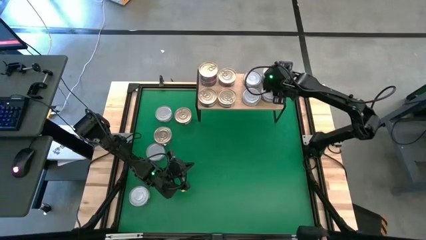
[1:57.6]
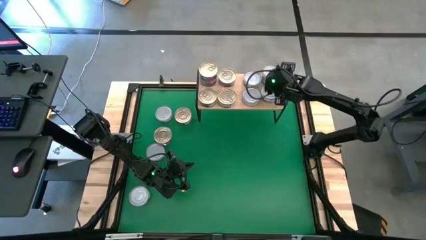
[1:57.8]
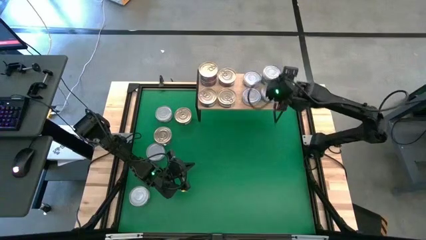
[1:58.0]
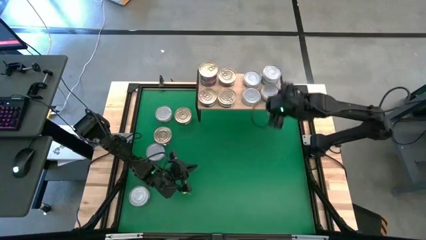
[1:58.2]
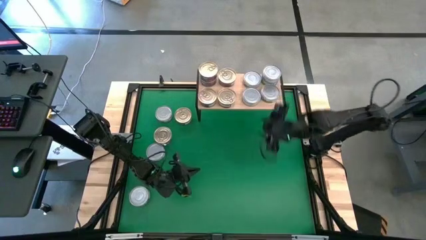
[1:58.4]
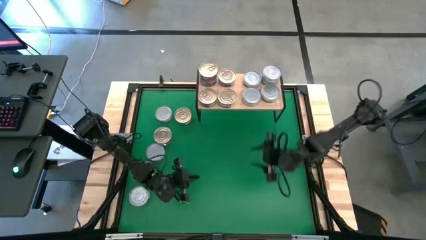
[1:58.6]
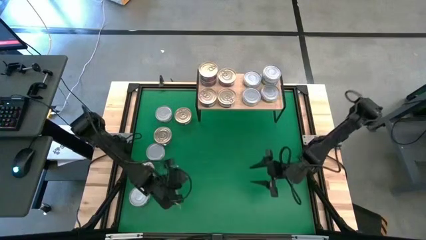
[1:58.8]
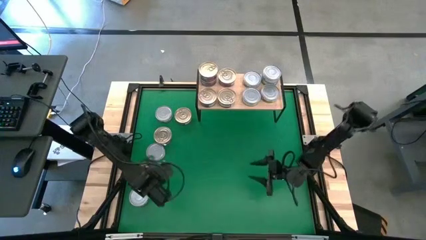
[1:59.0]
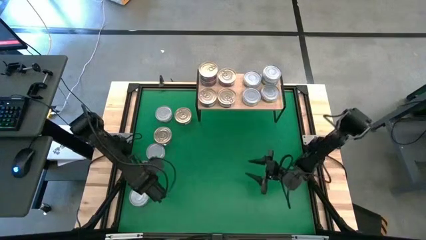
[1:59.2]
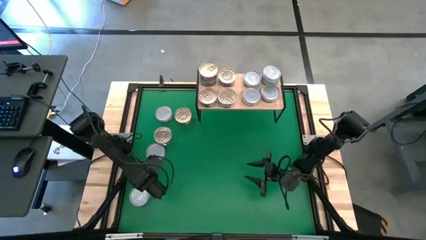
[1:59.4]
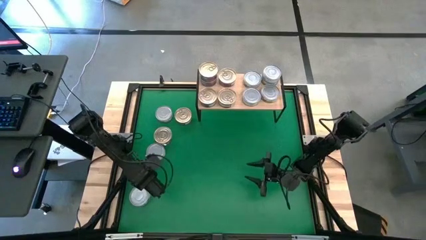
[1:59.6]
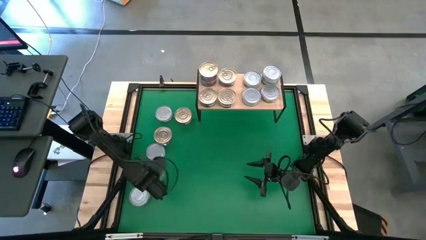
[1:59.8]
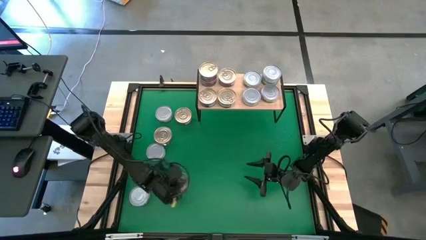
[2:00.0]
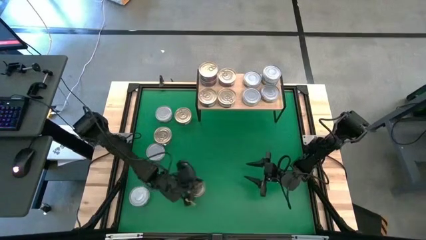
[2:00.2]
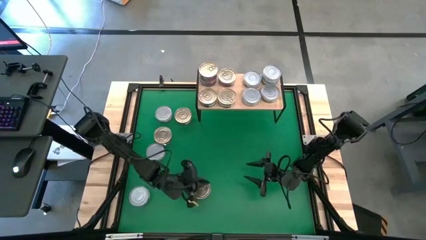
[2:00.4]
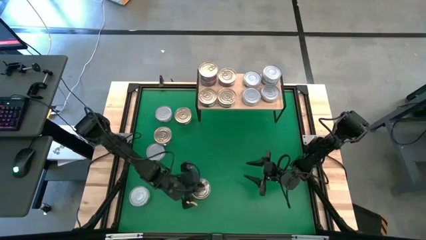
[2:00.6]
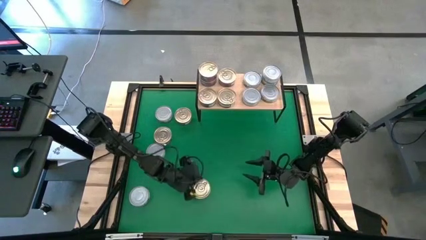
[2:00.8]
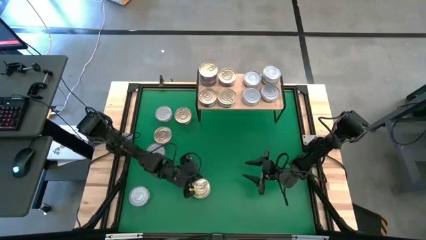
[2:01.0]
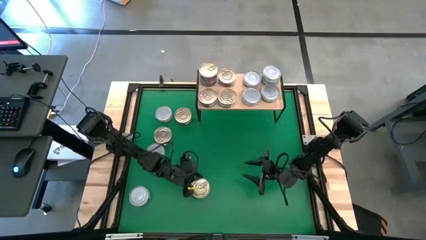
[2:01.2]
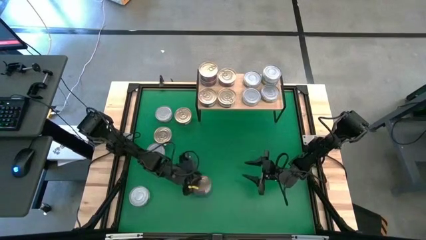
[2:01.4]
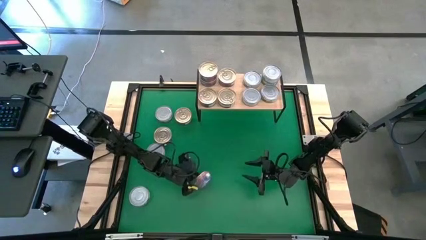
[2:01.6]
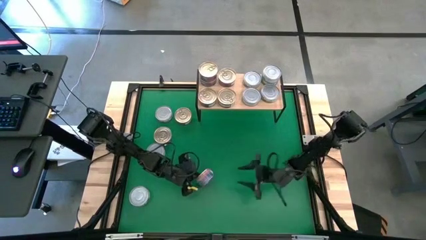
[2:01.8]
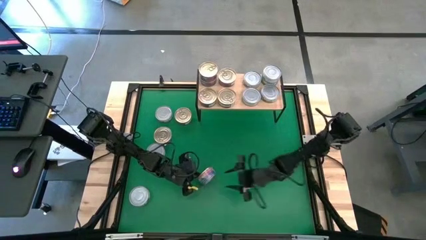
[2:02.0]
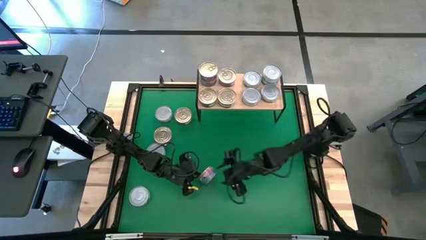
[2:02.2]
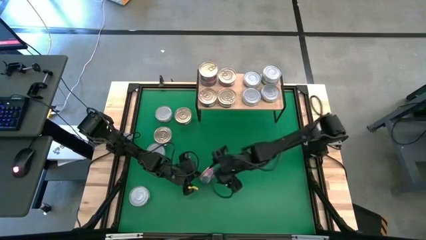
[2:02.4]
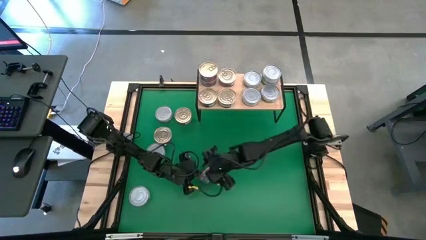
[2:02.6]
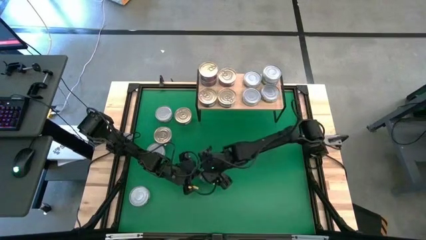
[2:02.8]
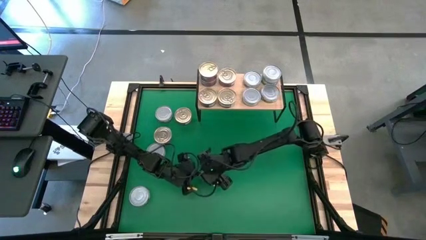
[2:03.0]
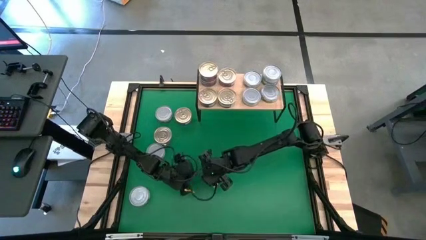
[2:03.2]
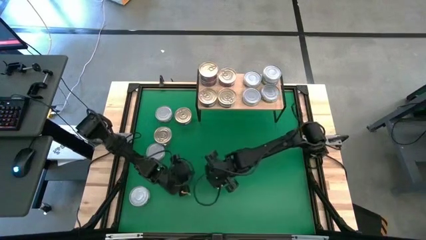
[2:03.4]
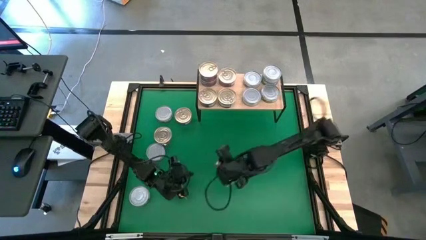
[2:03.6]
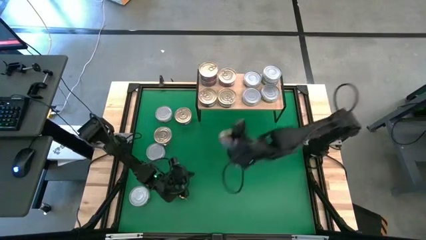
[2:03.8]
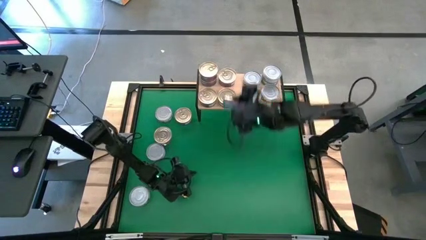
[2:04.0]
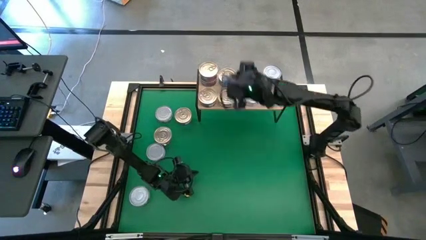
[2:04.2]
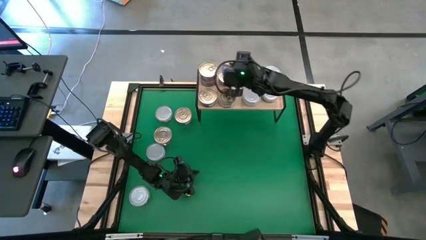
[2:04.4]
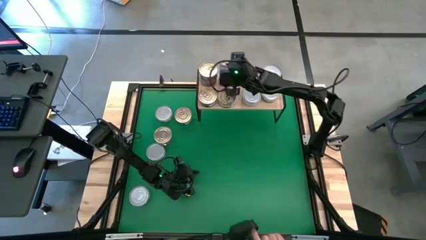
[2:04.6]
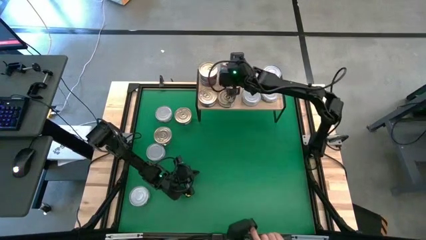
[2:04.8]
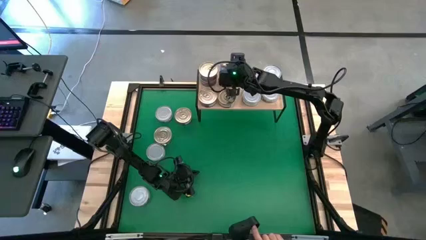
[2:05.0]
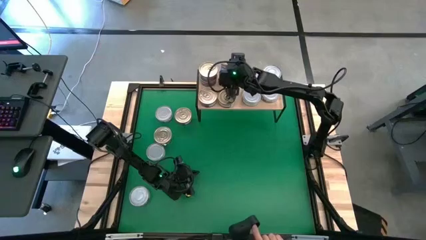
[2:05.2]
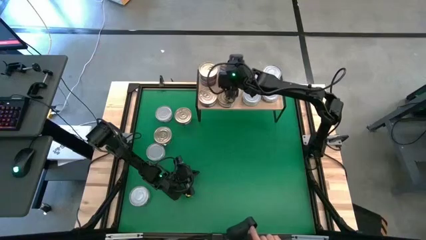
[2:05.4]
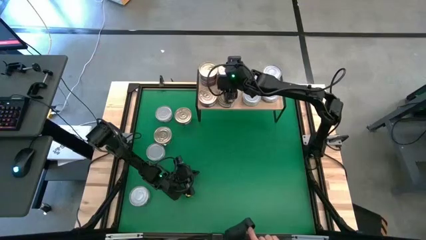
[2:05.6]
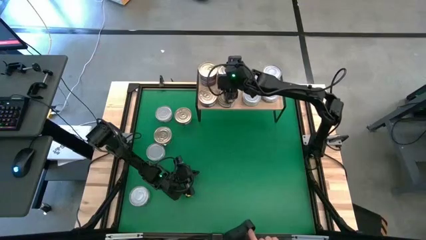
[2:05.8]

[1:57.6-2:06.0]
Task: Stack canned seafood by type on shelf
Stack the blue pink tuna can on top of the top right blue pink tuna can on the shelf

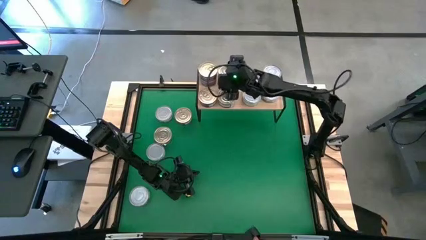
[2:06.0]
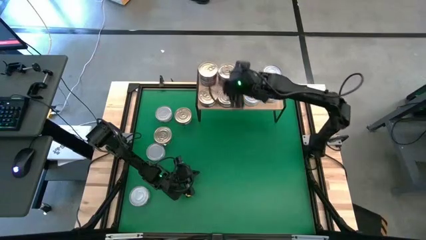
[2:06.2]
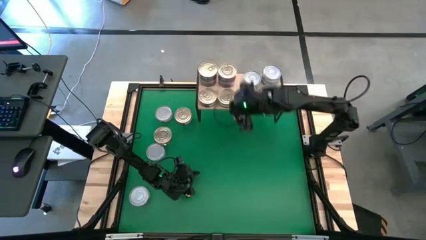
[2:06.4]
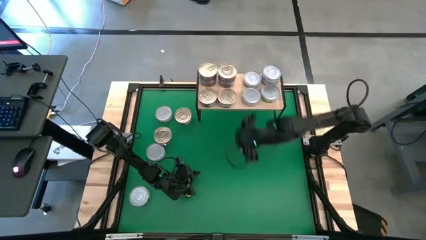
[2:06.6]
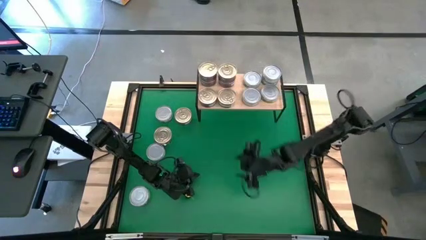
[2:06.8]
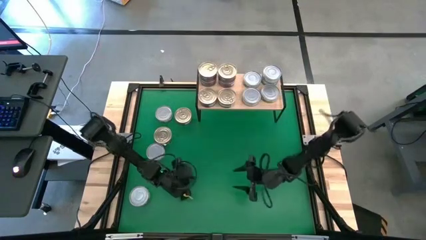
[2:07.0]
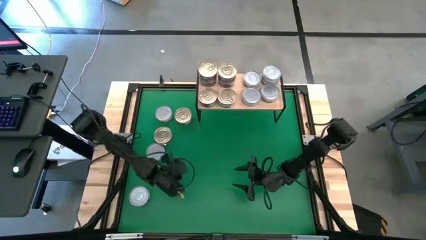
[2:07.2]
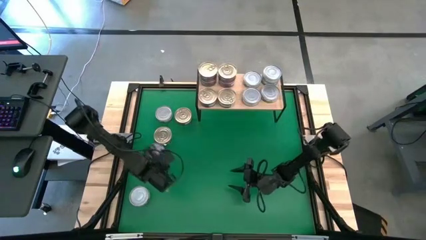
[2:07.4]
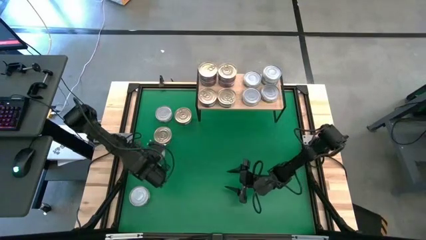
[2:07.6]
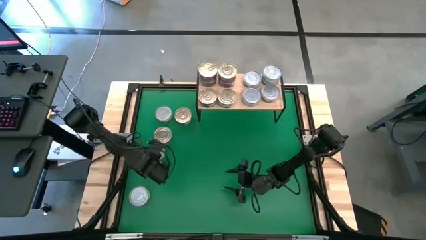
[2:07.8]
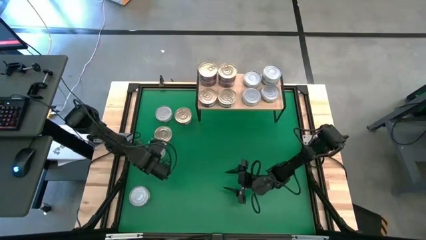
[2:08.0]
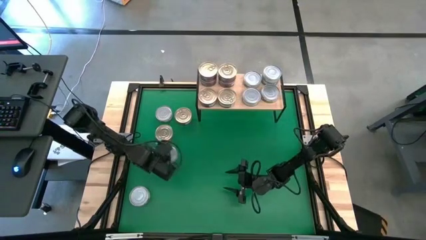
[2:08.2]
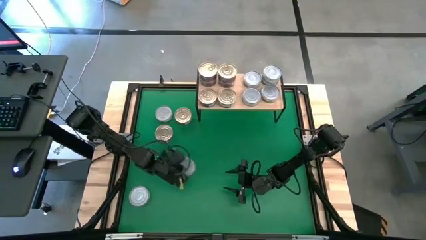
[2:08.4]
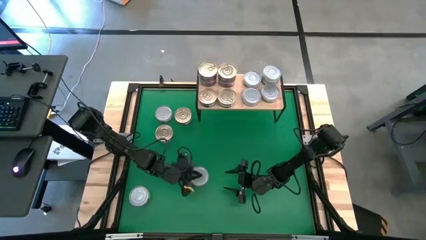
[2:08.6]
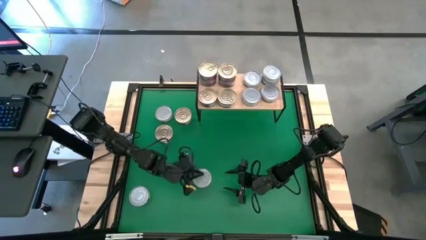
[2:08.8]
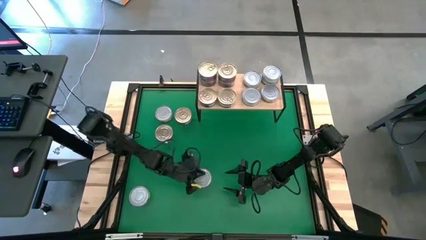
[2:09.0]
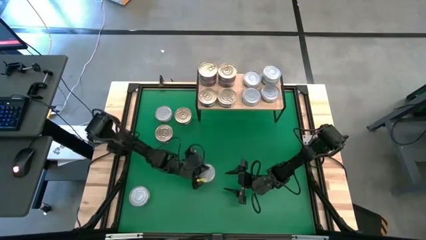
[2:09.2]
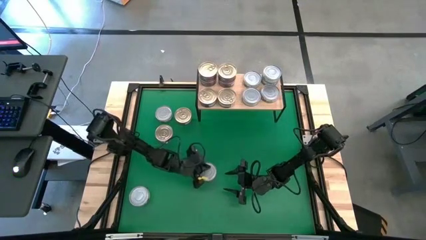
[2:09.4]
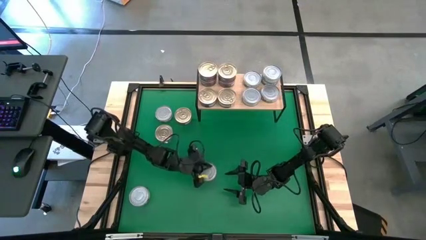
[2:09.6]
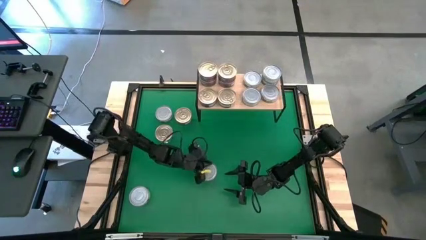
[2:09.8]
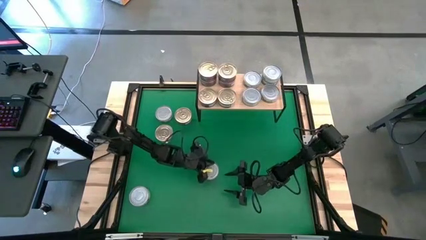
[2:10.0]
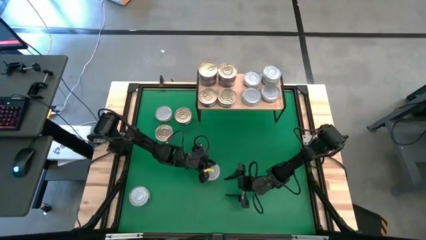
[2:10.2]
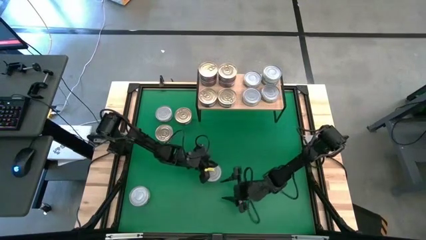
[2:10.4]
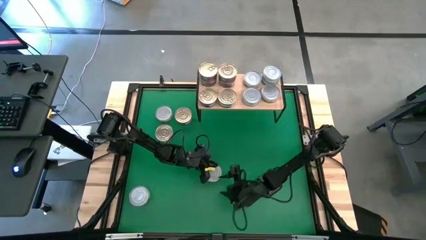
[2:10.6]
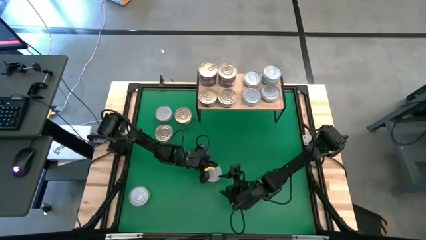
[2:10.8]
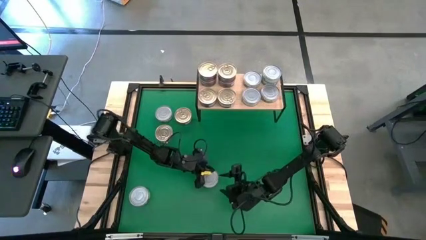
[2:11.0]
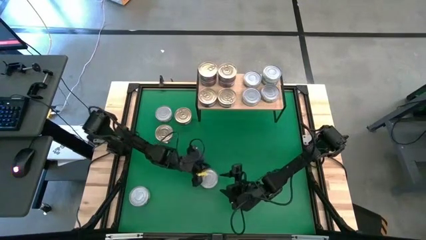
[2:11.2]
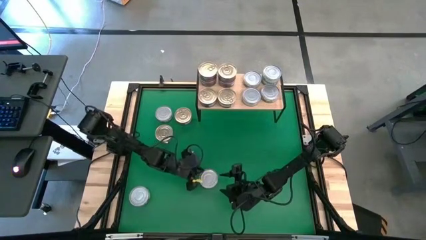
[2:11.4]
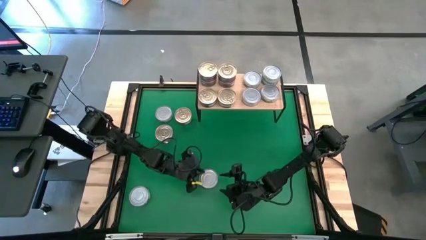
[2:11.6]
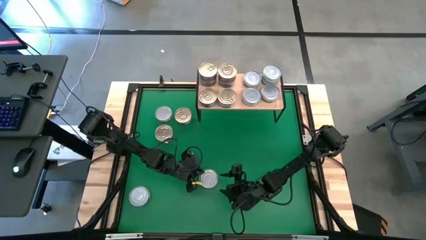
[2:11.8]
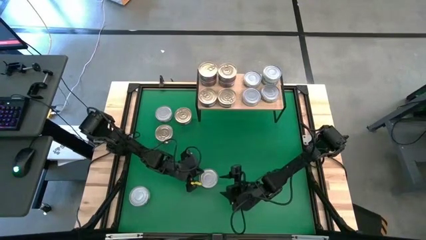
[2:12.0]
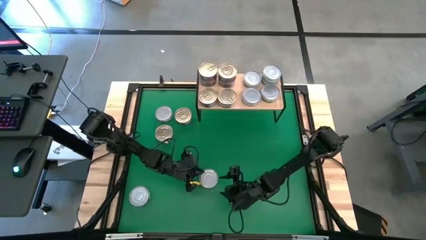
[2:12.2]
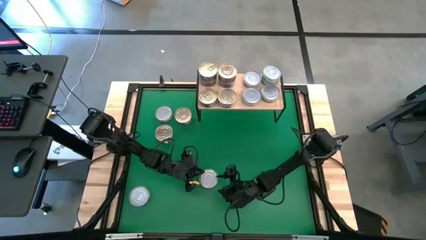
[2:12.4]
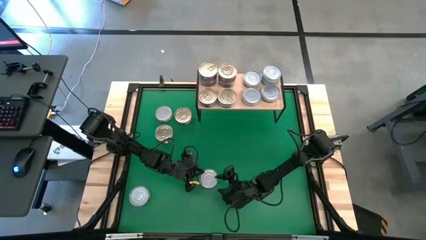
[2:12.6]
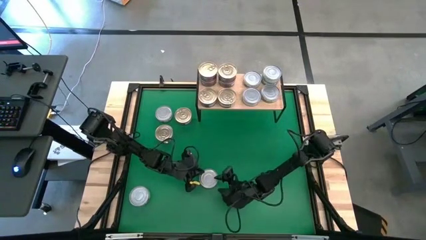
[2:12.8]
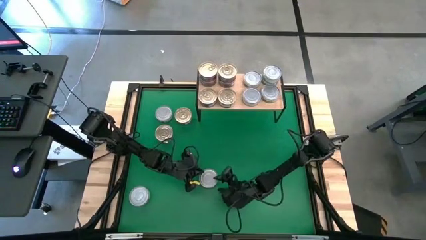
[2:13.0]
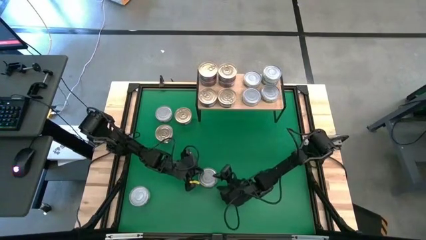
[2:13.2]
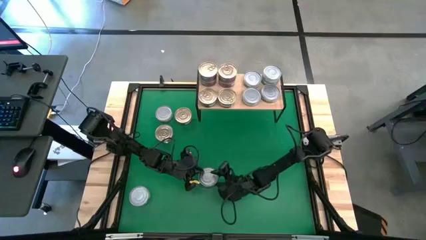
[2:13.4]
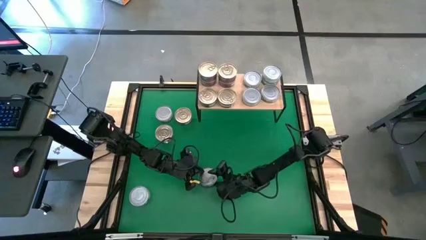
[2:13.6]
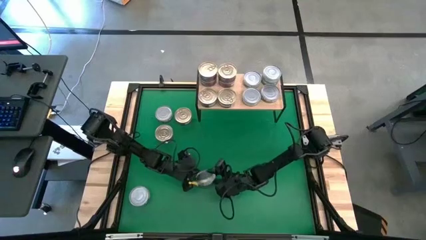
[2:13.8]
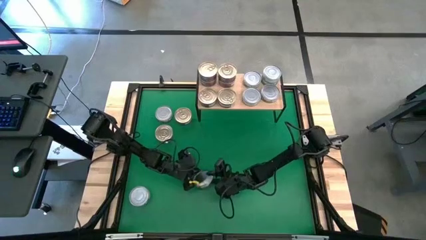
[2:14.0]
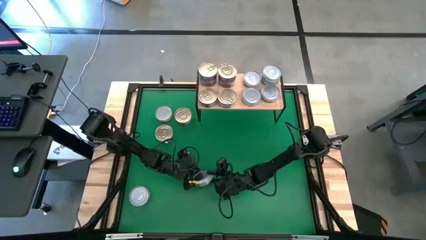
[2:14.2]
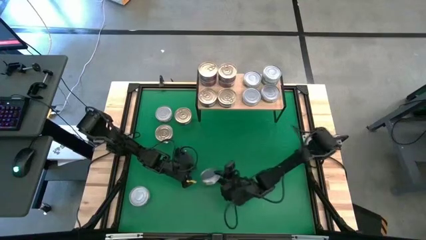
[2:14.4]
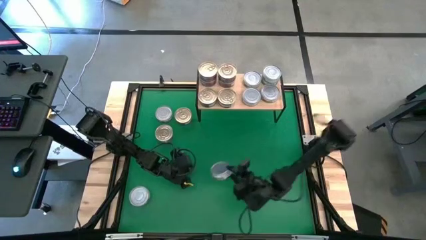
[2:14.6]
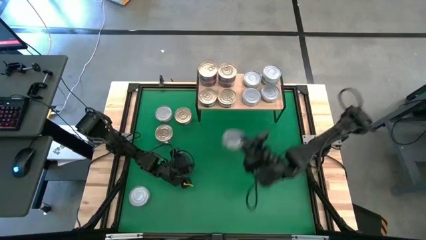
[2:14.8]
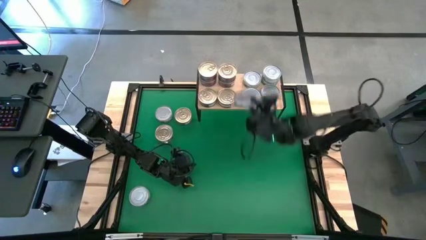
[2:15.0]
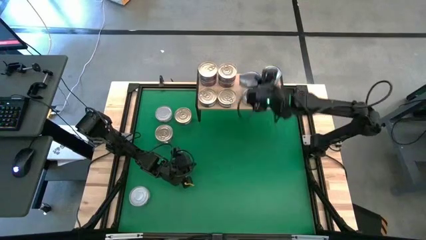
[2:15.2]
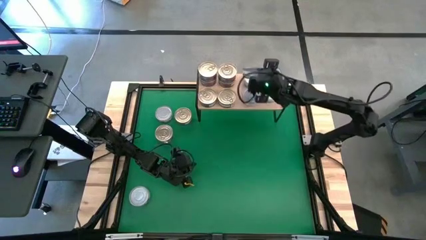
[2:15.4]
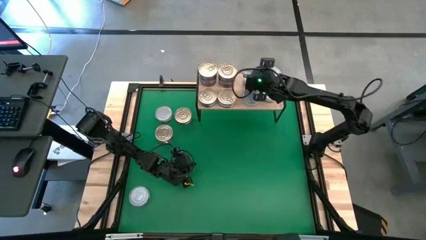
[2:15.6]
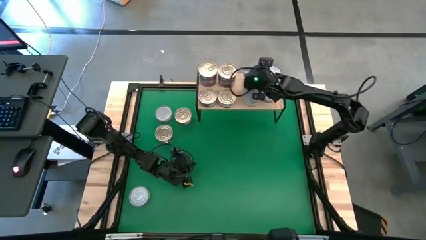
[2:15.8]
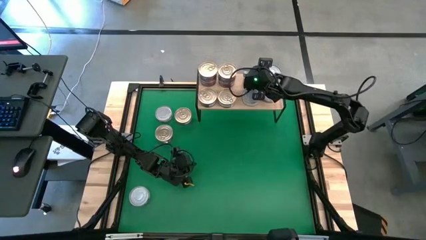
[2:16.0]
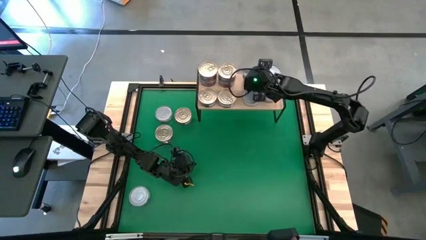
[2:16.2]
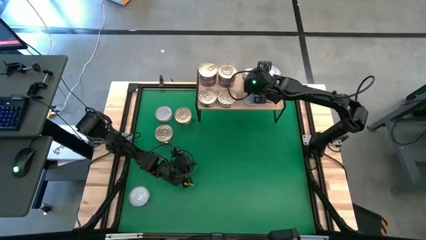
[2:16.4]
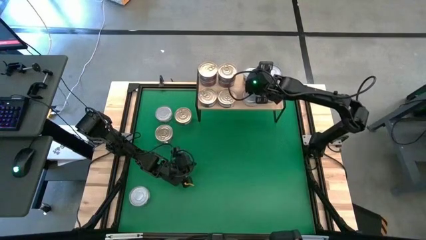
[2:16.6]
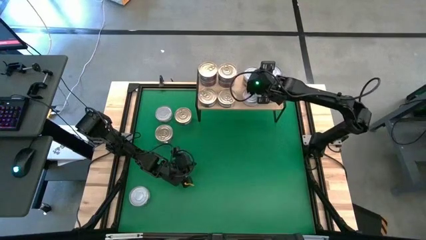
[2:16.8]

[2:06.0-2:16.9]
Stack the green tuna can on top of the top left green tuna can on the shelf
